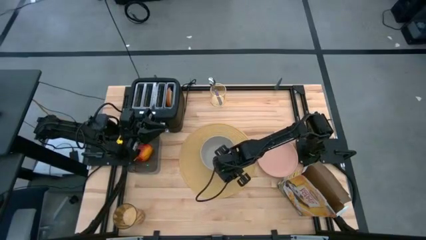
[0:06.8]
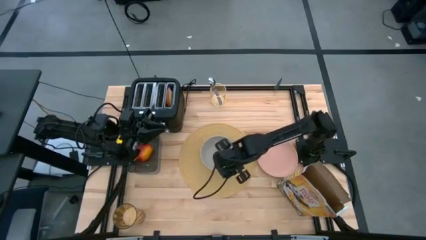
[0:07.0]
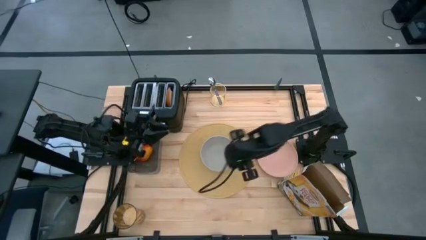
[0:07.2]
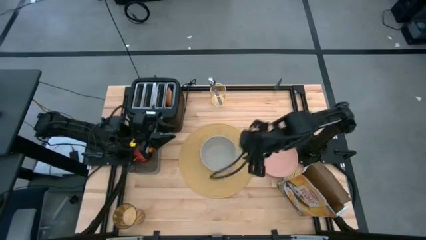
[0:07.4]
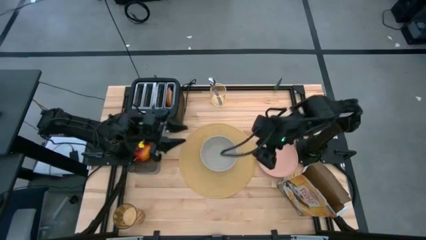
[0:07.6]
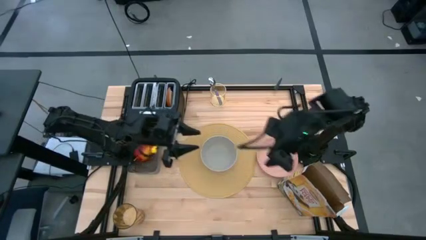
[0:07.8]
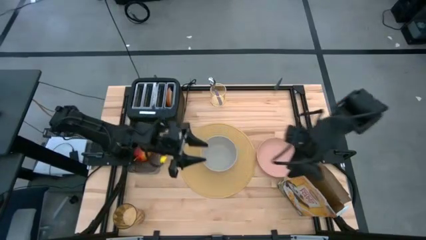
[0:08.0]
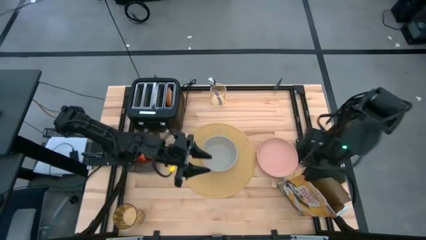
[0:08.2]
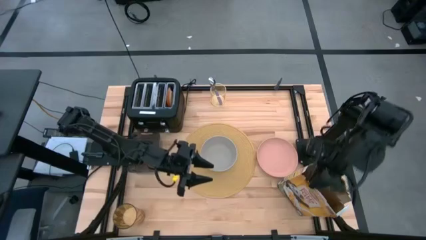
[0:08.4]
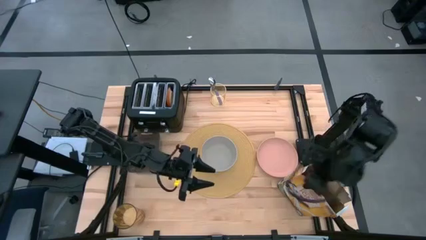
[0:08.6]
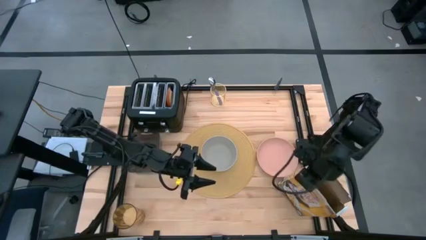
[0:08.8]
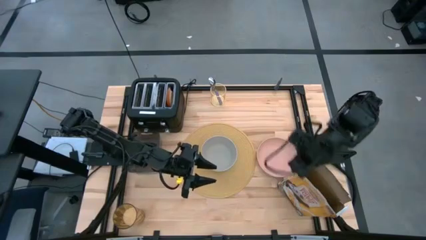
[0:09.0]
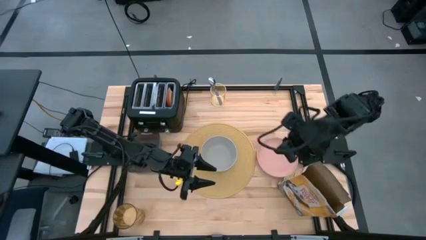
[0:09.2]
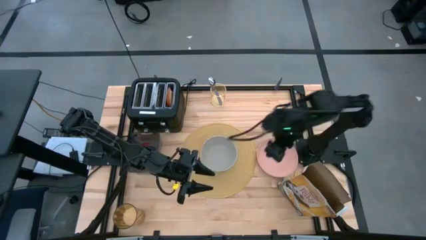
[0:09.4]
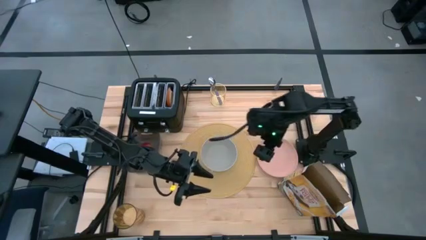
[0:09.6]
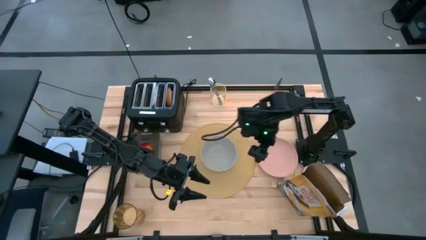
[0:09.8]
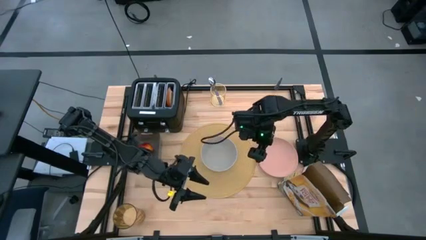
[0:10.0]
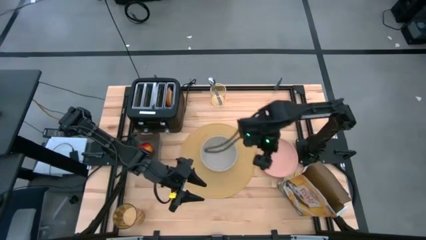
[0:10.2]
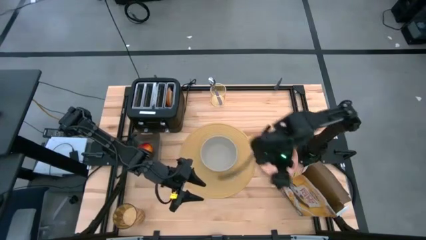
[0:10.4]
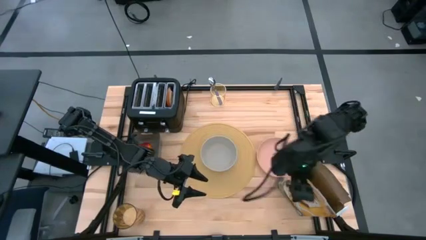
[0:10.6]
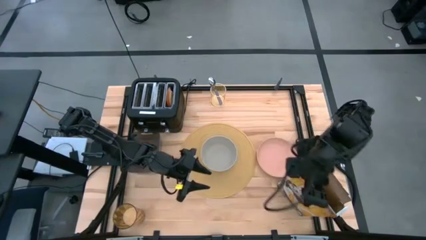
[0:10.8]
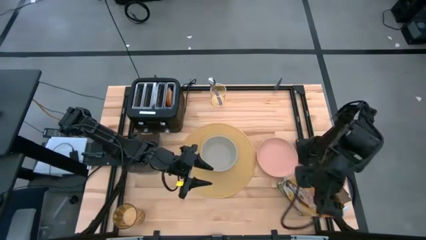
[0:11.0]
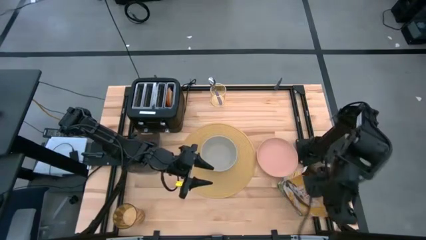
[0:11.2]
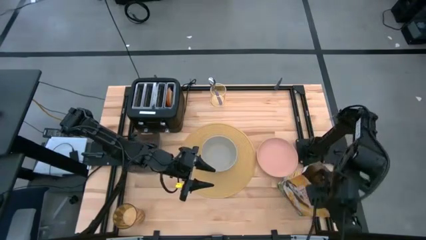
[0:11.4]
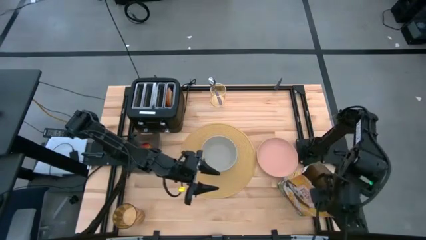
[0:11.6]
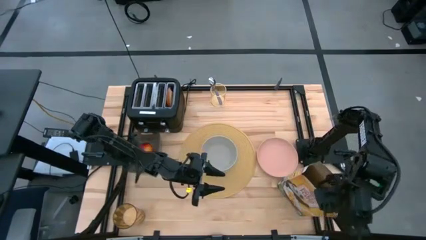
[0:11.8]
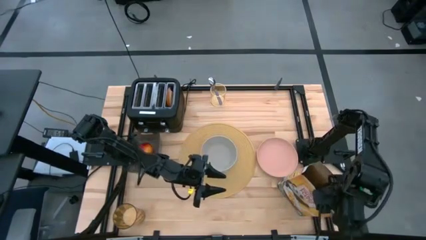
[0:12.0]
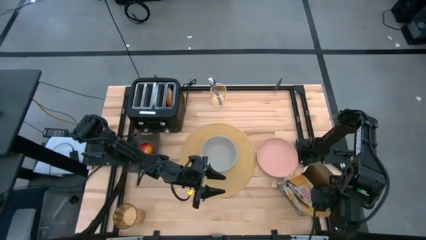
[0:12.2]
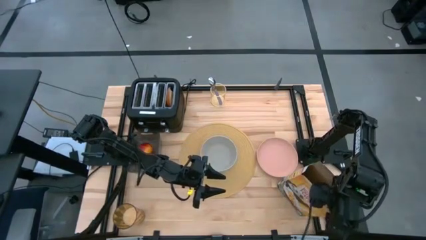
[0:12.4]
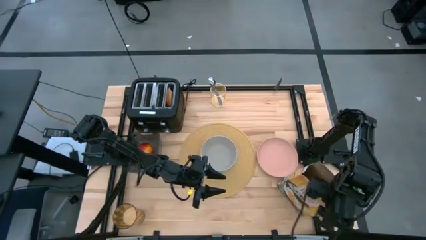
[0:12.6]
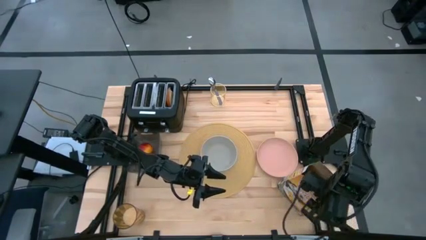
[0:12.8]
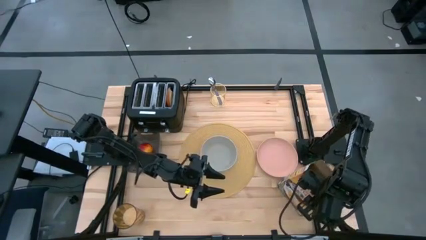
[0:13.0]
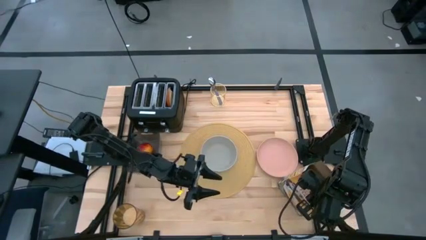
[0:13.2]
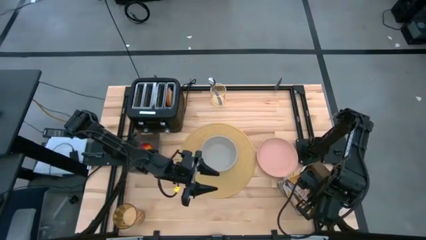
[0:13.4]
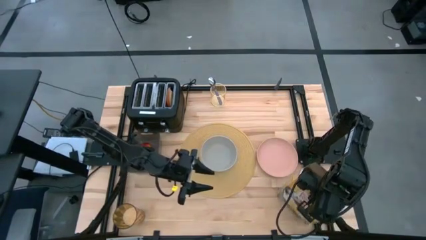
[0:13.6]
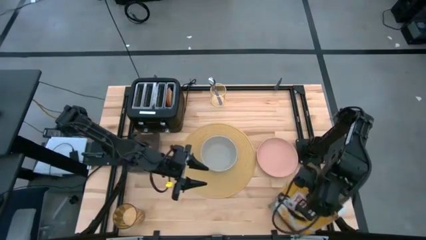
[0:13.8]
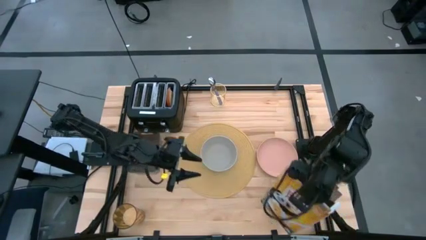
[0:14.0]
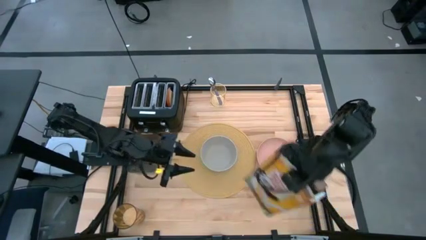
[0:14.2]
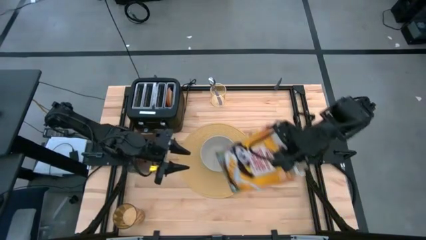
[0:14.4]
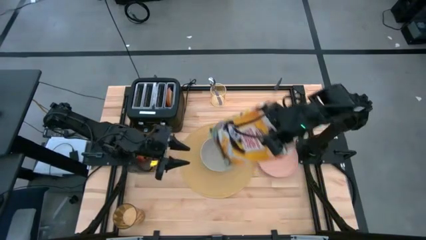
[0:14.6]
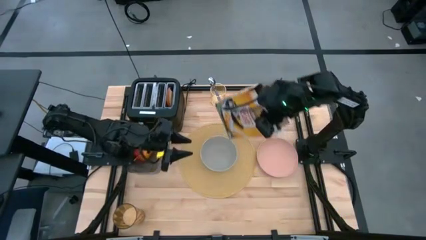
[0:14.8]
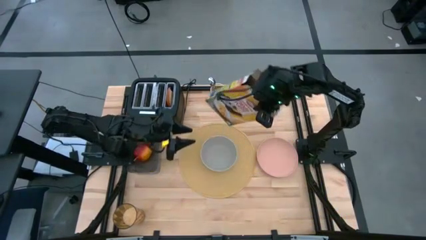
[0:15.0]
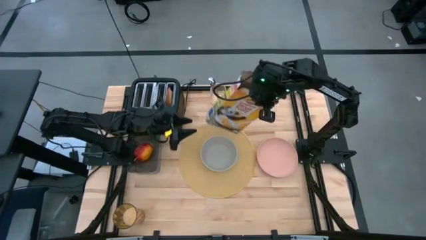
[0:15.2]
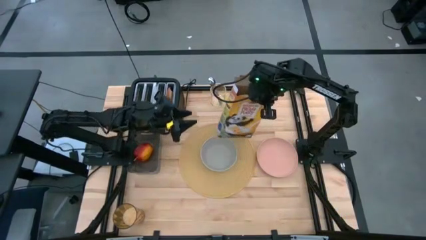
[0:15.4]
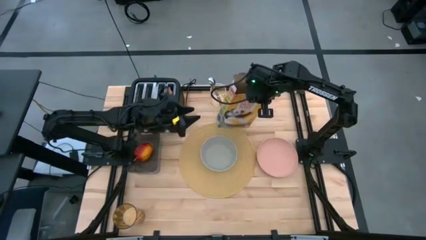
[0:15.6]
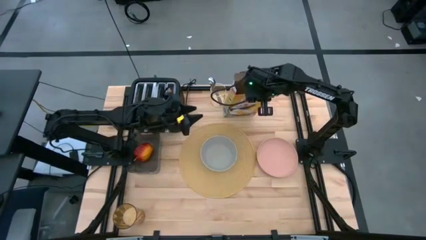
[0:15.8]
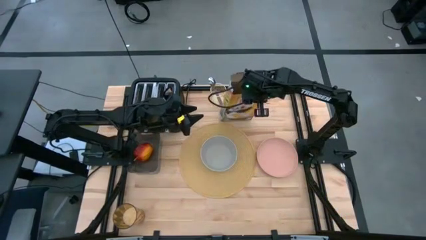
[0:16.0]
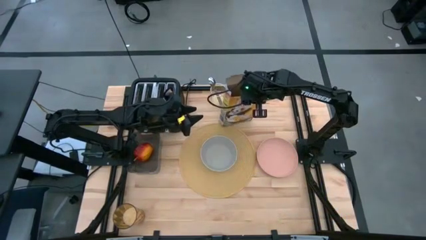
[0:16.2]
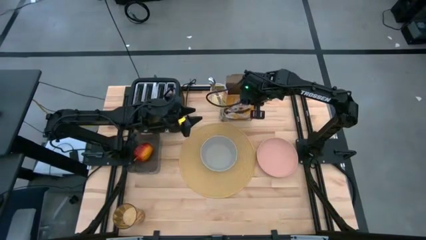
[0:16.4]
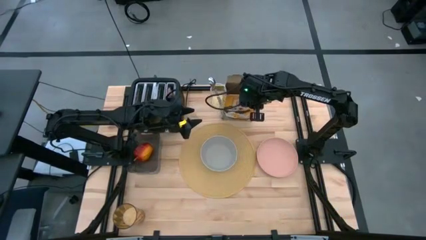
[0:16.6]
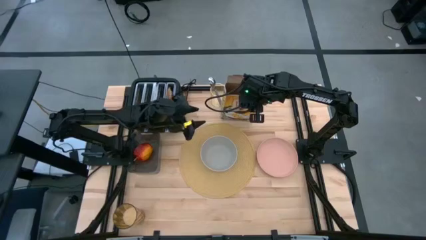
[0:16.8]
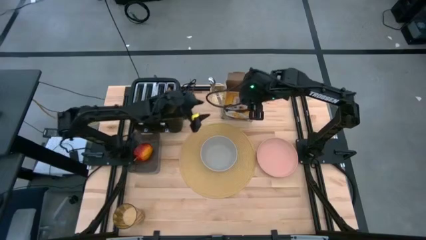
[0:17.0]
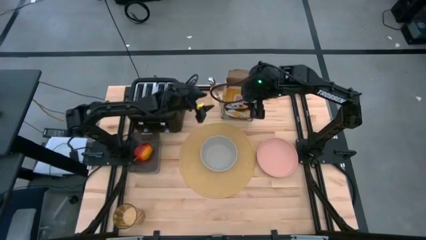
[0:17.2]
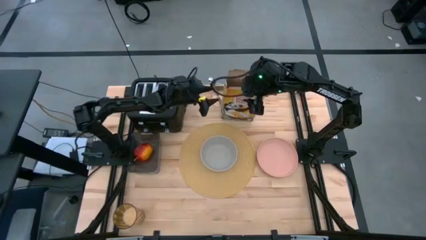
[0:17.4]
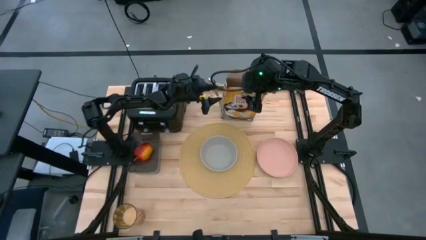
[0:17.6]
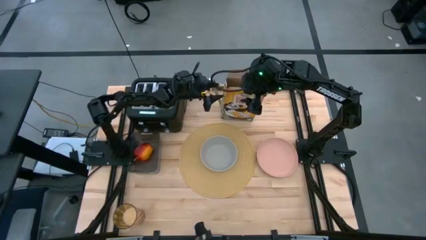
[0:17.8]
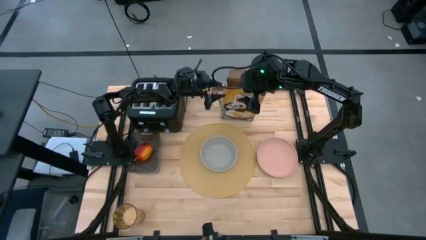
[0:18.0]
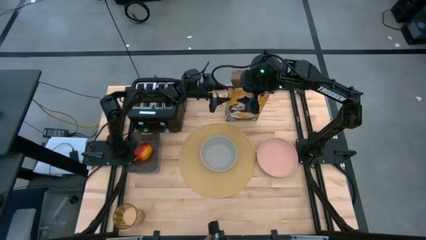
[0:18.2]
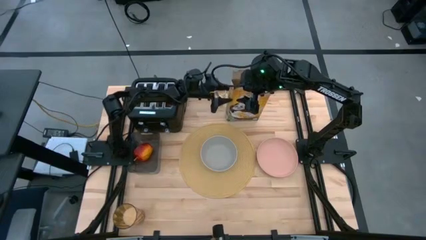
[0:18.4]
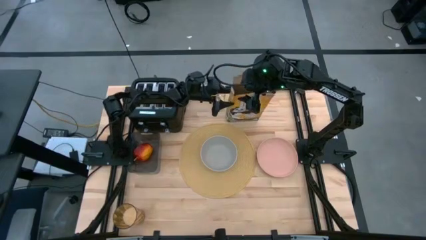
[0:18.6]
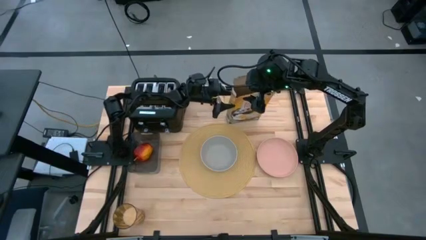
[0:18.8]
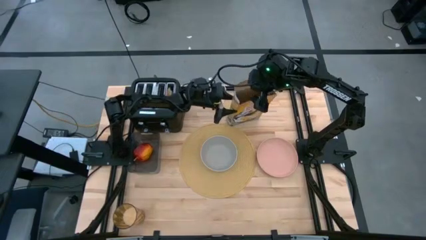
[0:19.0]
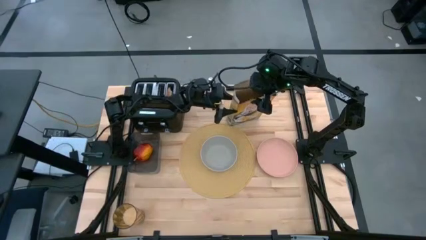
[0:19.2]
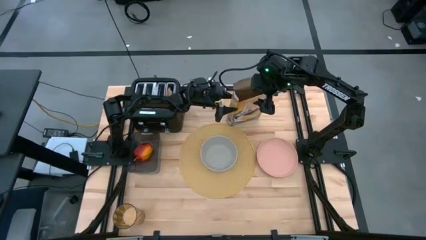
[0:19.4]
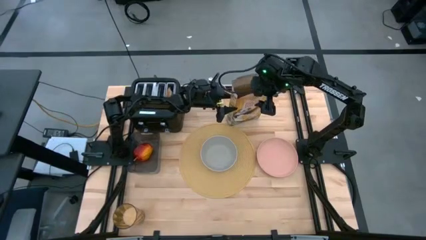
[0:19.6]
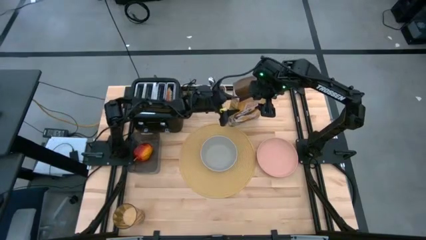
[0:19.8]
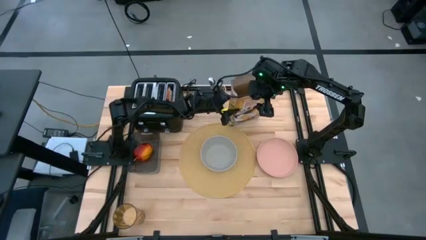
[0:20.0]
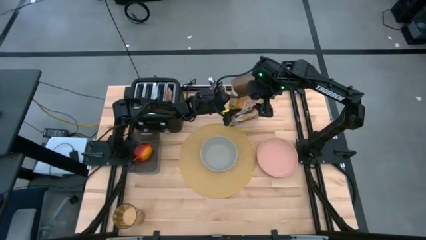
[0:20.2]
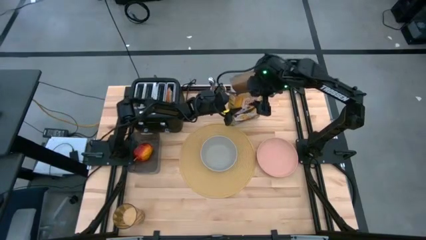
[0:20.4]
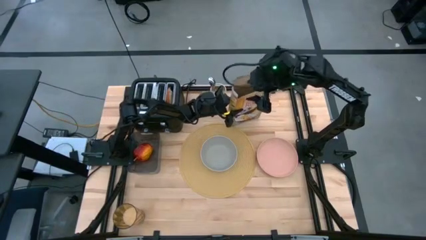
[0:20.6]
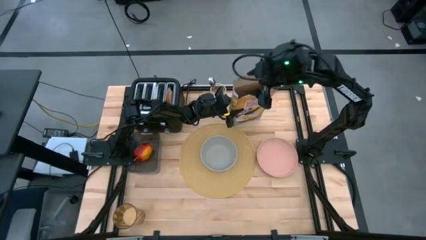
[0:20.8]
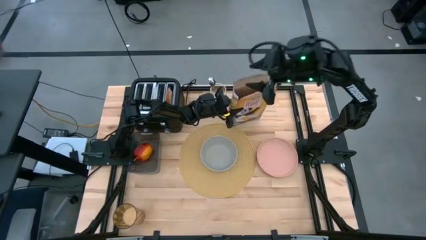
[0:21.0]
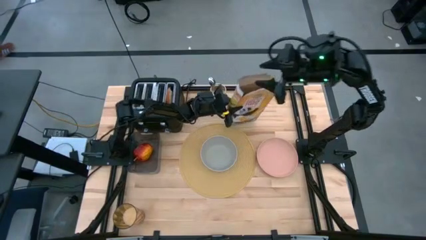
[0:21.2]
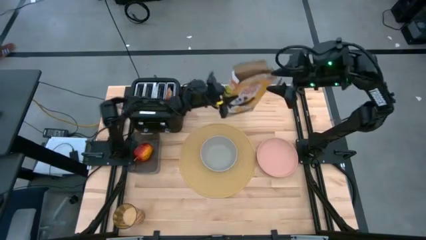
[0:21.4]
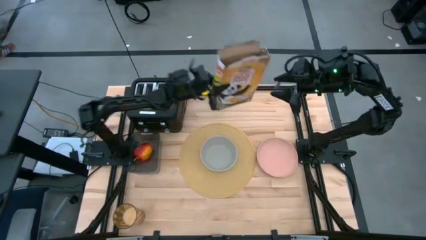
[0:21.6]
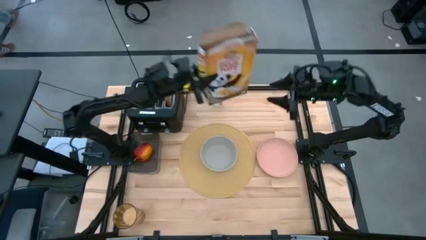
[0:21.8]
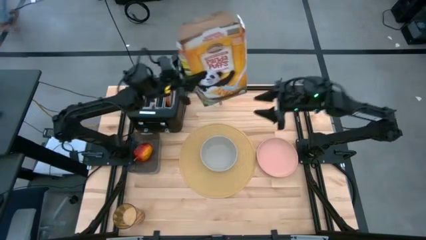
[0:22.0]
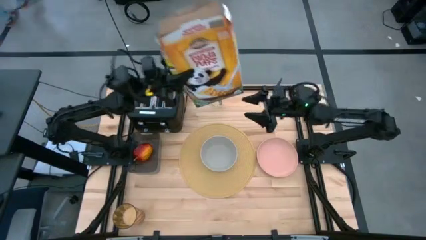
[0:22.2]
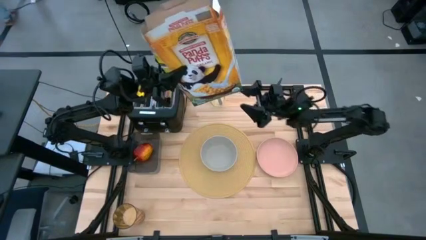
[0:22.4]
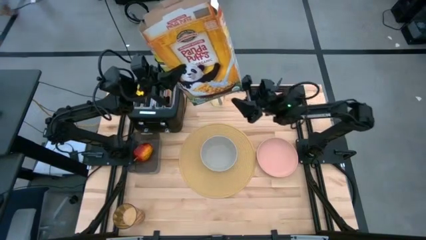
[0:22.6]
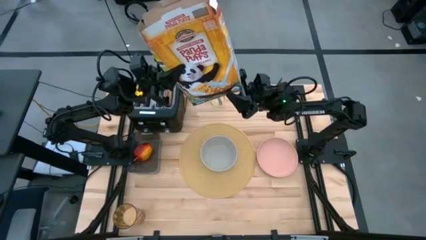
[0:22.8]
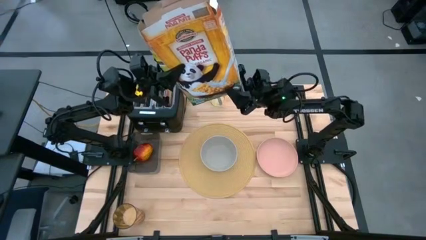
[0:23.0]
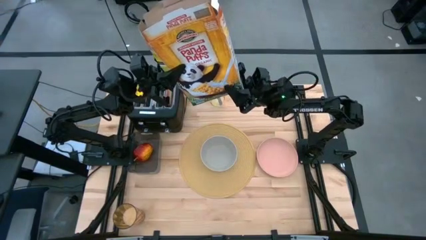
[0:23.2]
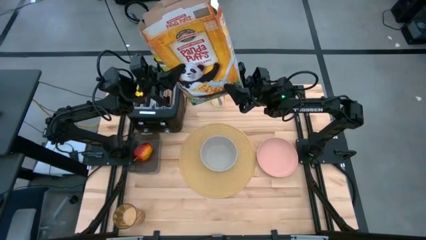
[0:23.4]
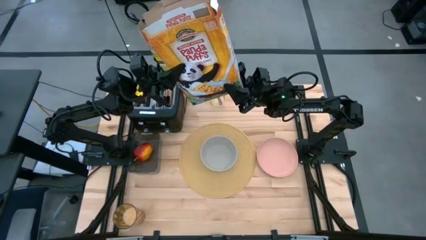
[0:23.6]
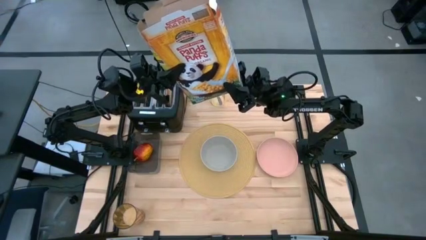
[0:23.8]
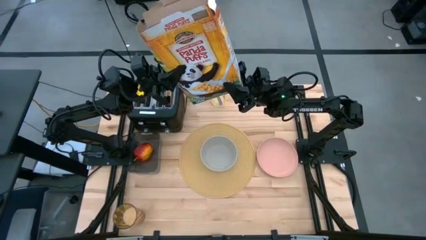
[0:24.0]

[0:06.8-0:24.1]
Task: Arrange a breakfast setting
Pour the cereal into the gray bowl
